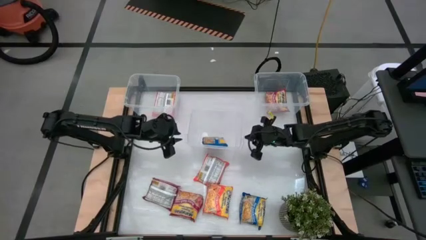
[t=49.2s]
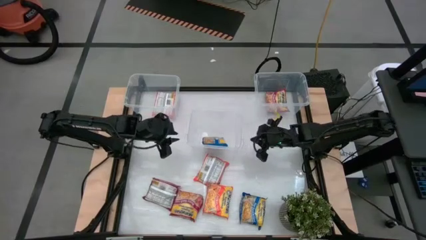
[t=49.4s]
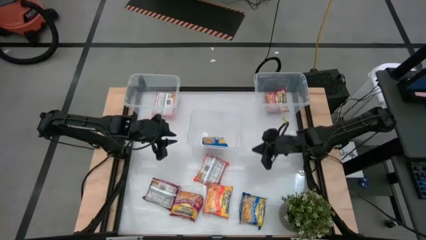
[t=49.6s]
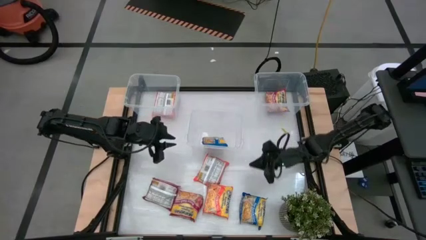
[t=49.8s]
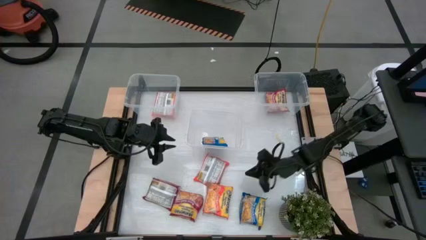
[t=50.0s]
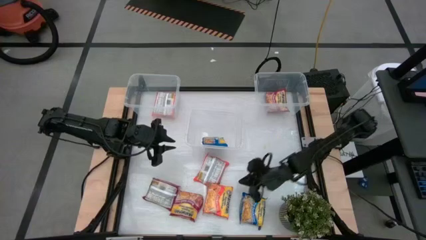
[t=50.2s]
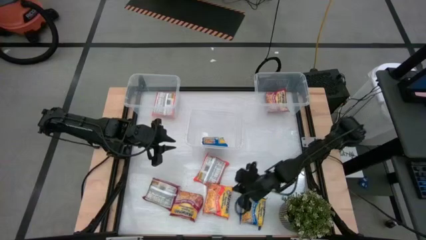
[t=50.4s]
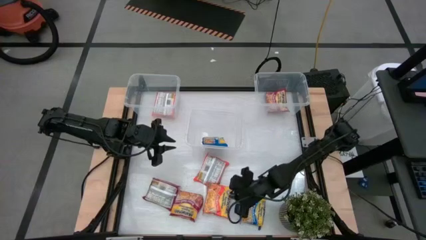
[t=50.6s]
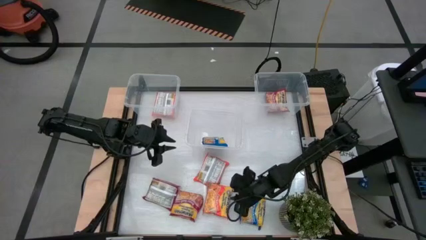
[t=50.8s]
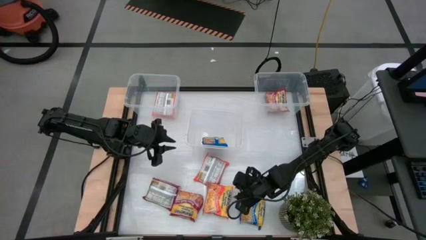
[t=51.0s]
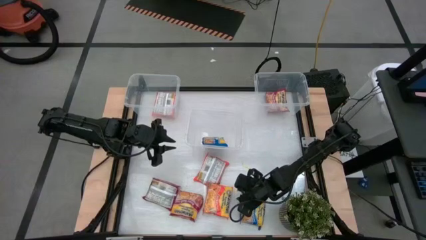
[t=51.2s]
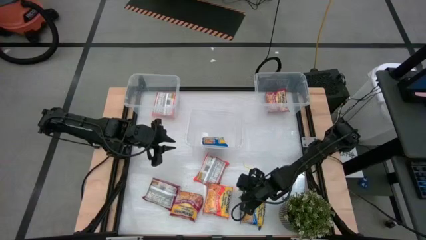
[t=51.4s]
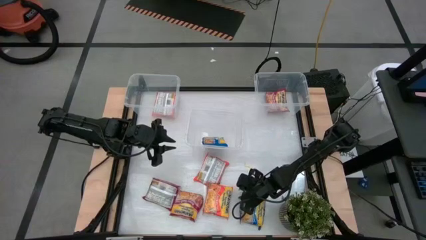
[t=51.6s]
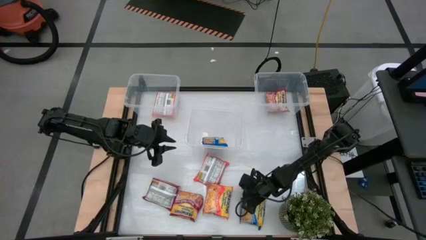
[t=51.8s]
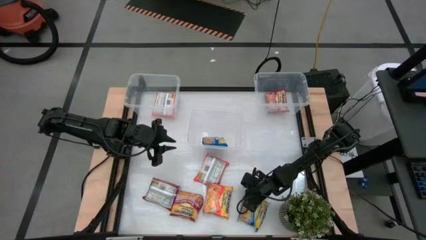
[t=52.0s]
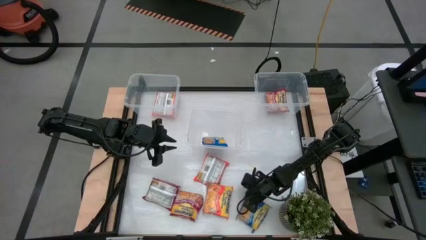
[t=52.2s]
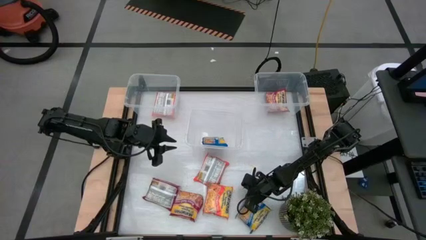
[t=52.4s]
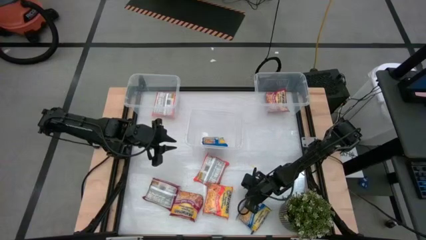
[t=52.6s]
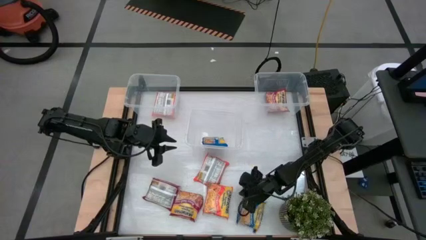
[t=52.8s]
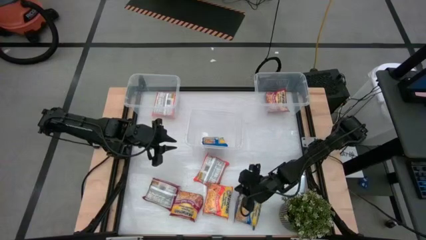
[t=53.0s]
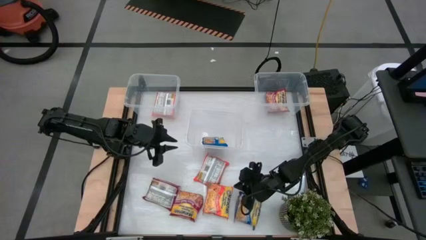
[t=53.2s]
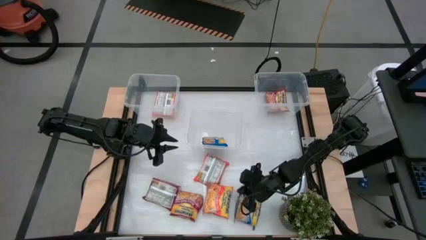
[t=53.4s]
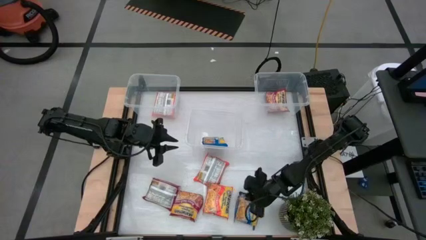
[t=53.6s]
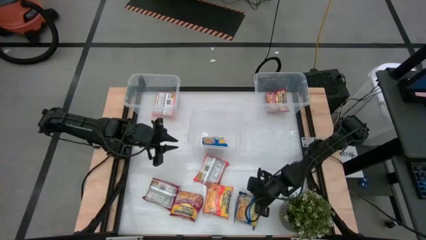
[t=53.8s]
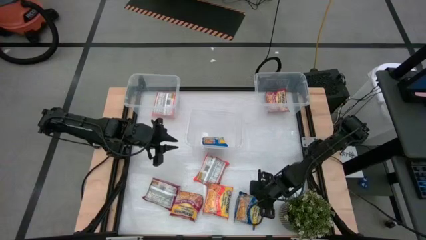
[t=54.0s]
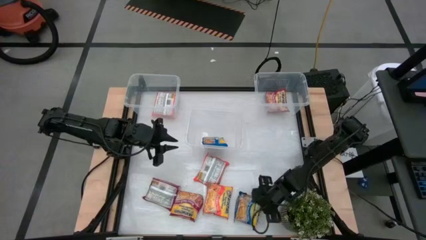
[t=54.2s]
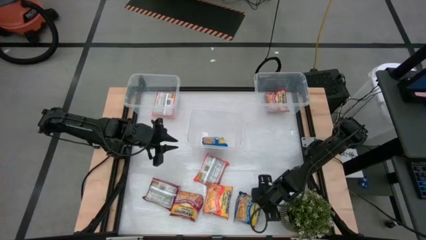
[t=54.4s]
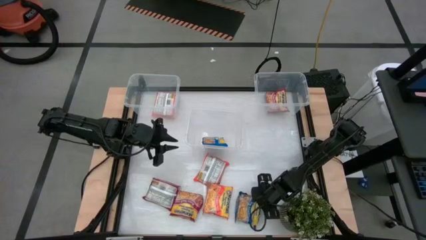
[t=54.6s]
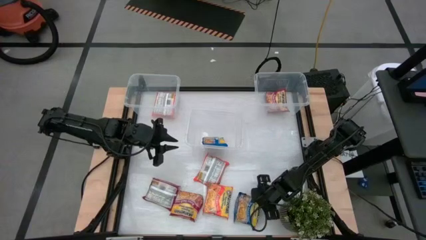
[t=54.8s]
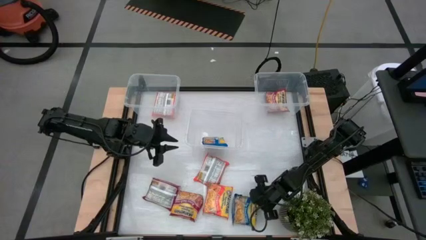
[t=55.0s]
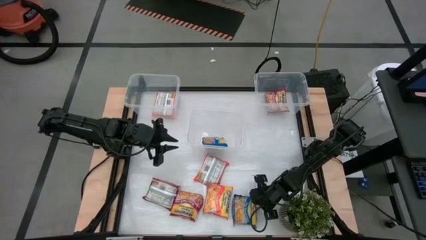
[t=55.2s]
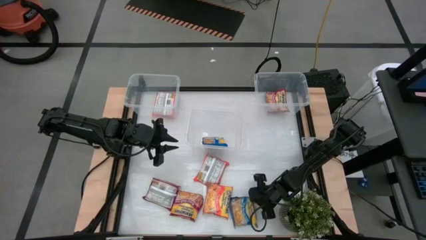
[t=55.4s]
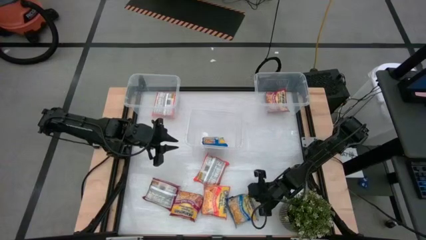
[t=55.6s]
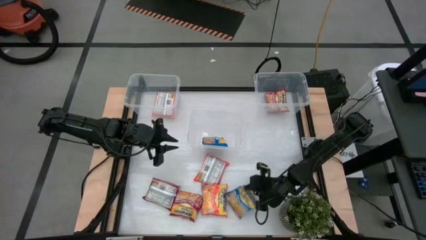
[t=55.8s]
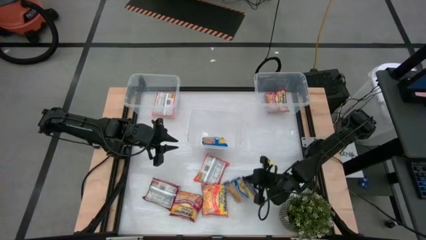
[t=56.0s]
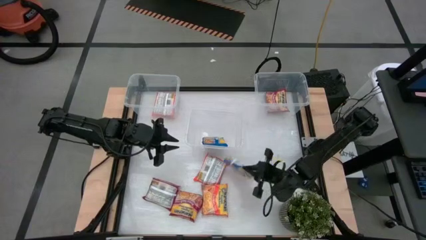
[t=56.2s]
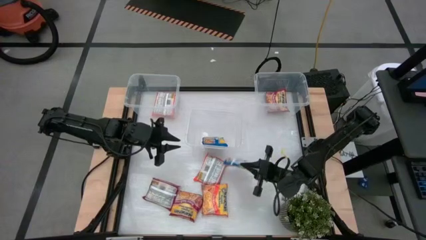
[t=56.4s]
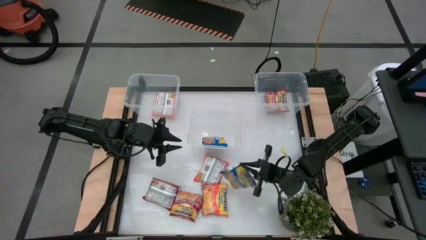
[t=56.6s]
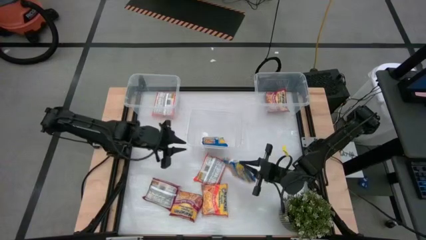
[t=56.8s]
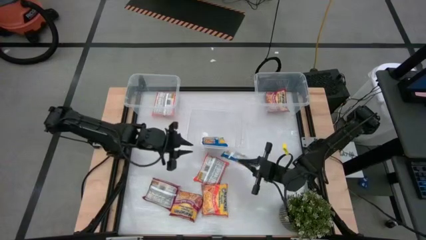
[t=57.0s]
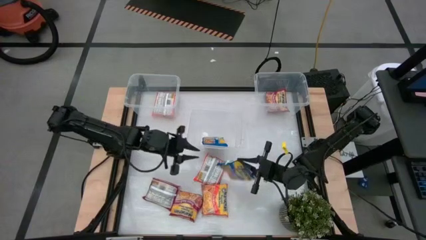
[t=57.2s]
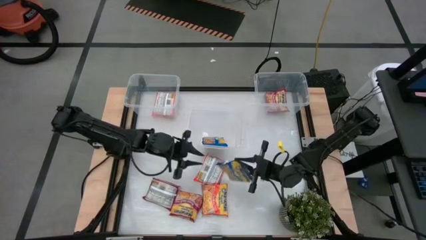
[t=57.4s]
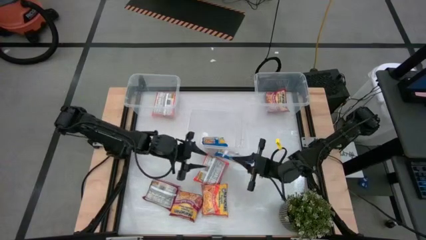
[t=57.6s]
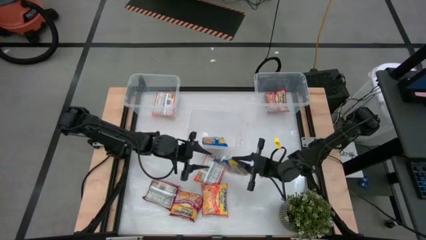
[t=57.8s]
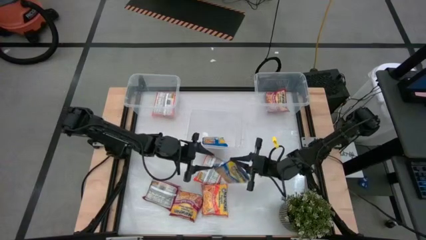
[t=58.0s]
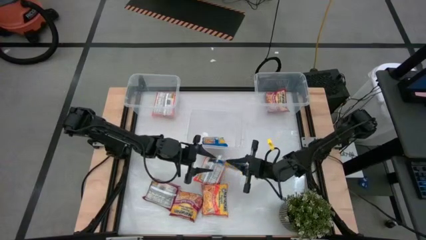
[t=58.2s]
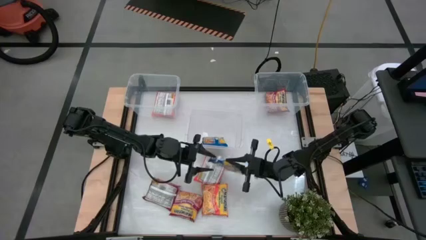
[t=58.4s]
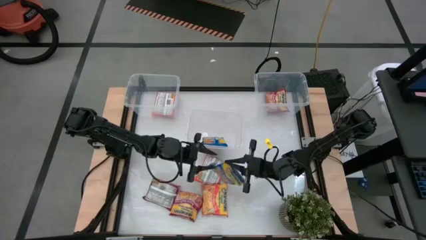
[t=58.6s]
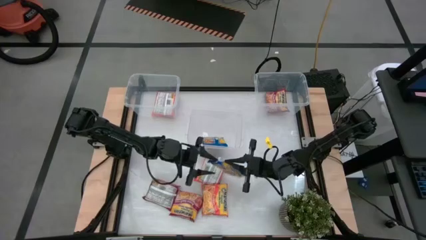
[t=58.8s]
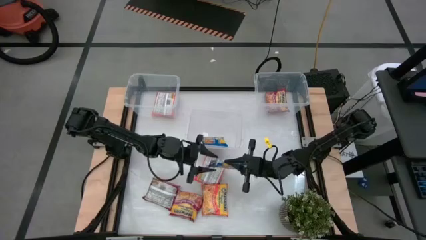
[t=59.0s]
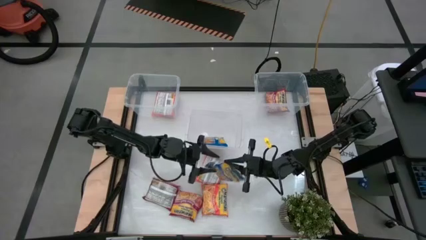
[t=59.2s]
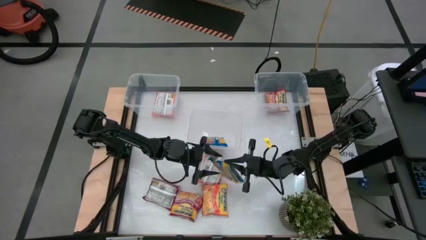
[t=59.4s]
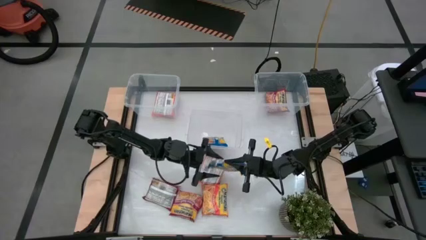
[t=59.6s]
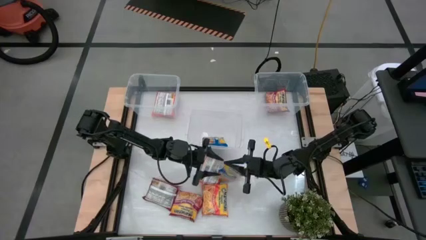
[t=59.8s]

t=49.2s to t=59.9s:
Task: Sort Maruchan noodles
Put the blue noodle pack into the bottom transparent bin

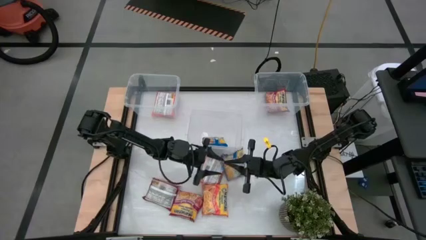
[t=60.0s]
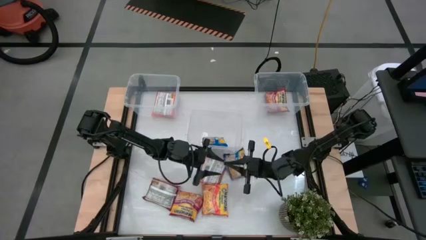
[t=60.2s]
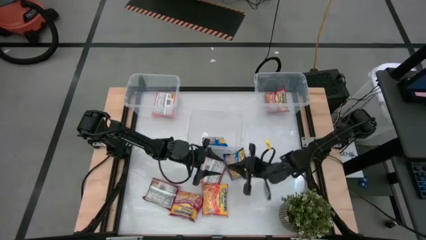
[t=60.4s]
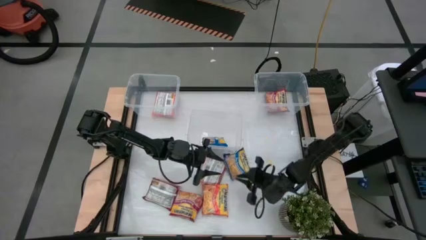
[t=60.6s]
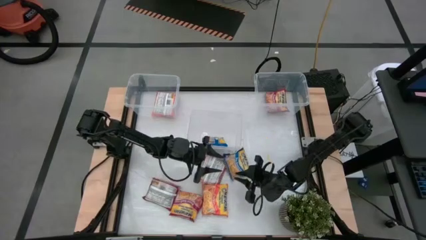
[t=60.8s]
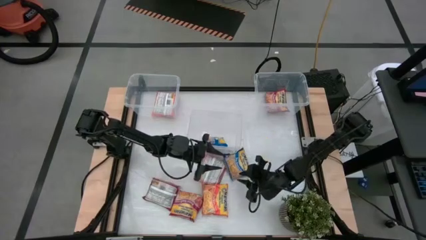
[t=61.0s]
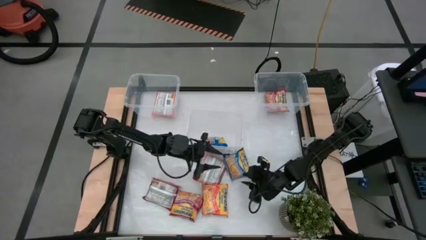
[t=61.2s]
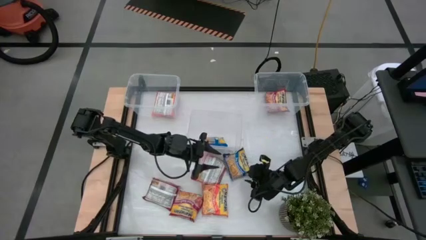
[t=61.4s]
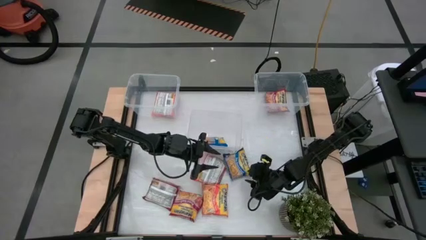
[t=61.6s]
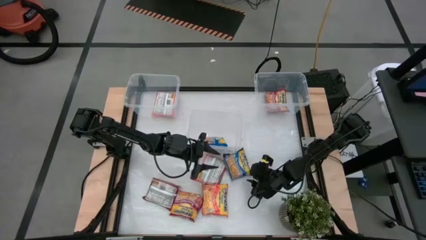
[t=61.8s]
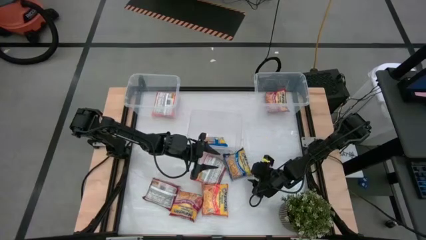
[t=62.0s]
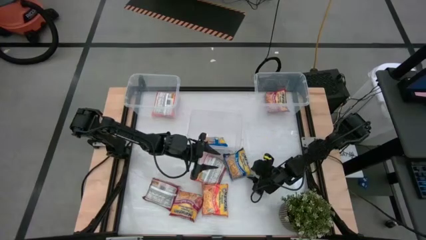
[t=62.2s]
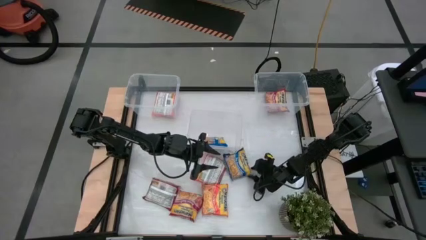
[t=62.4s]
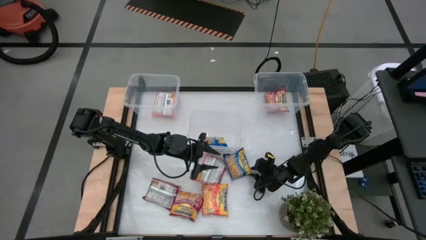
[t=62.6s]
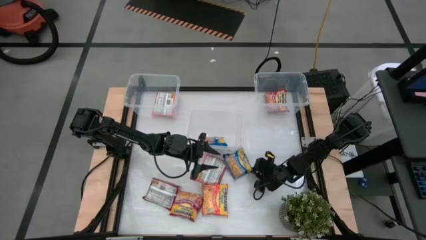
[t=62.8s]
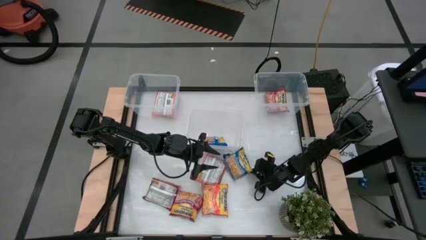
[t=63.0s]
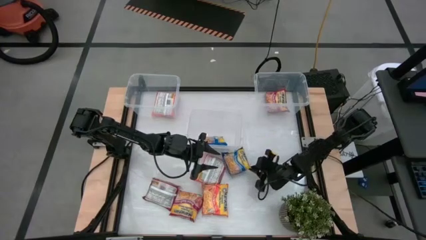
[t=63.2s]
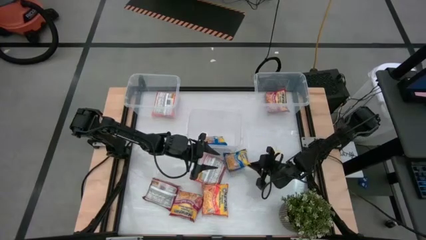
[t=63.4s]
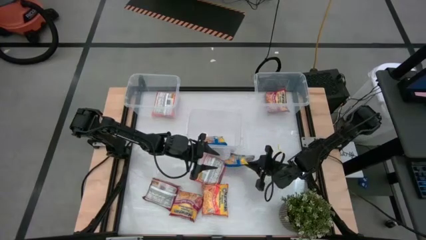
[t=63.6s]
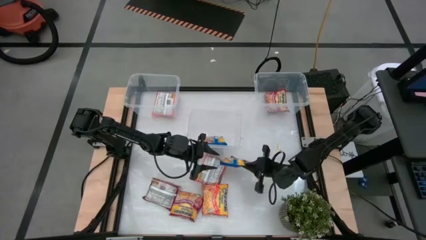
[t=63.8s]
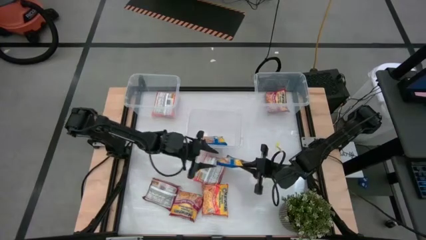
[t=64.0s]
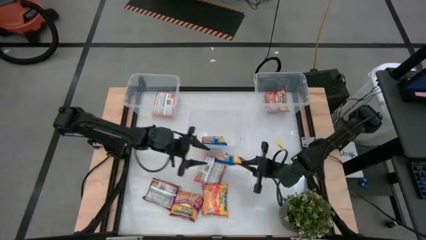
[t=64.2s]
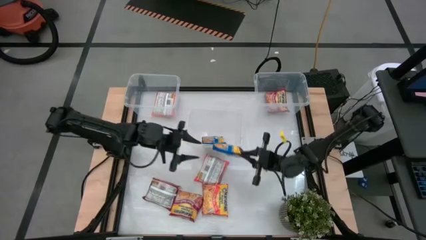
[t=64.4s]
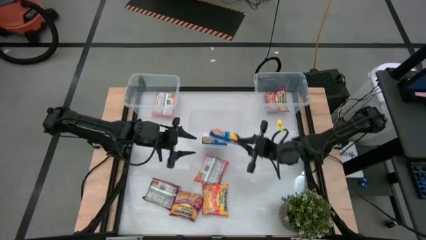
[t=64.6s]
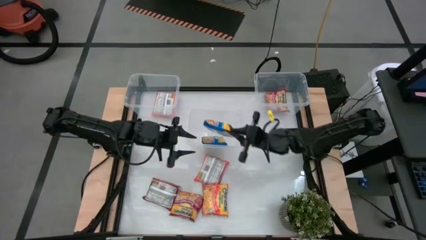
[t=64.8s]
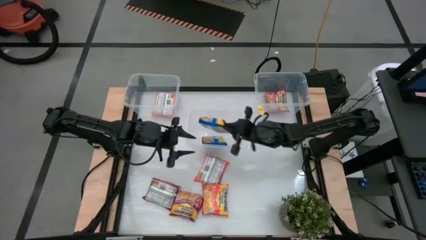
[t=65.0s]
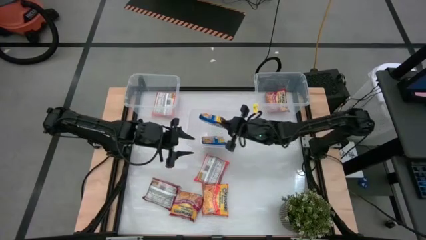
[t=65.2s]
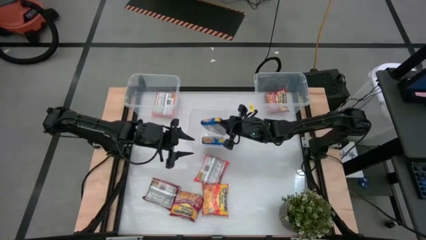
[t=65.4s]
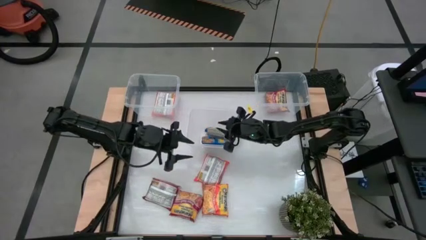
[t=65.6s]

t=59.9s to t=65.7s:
Put the blue noodle pack into the bottom transparent bin
